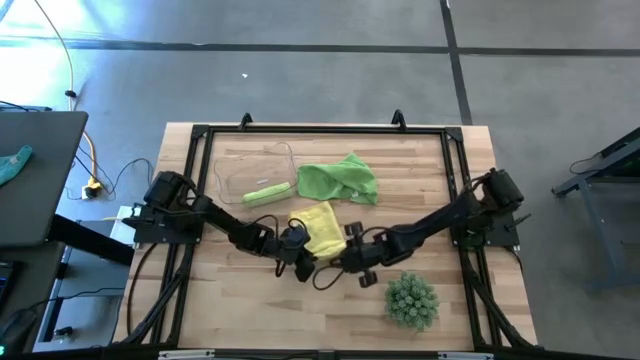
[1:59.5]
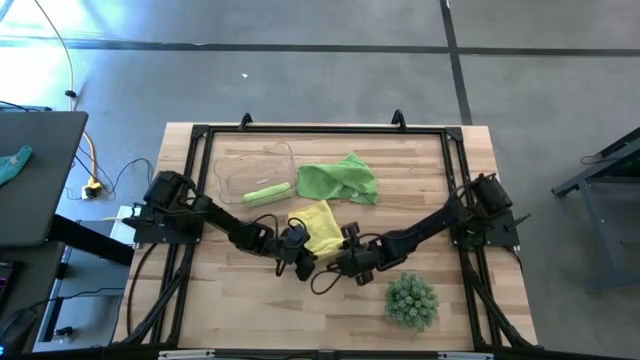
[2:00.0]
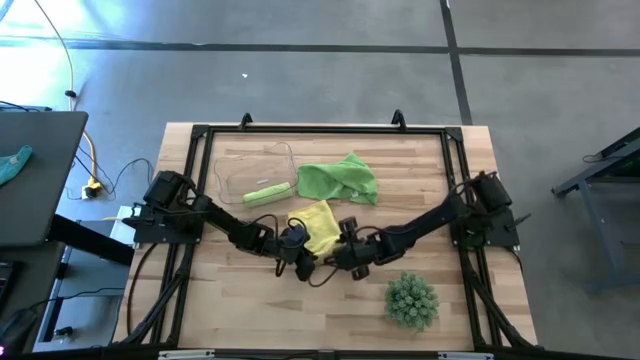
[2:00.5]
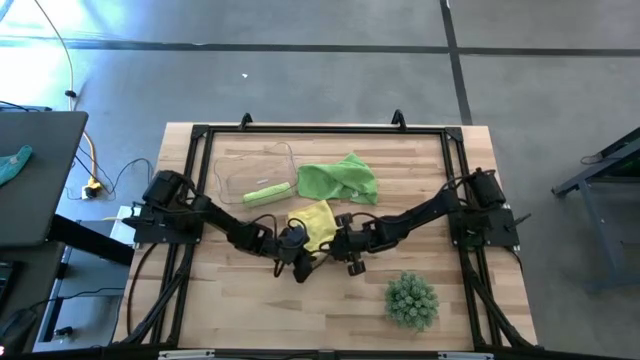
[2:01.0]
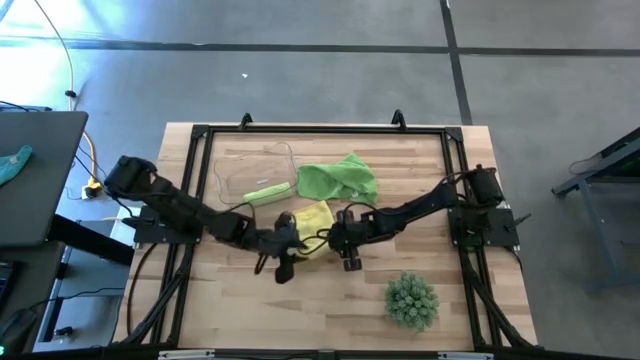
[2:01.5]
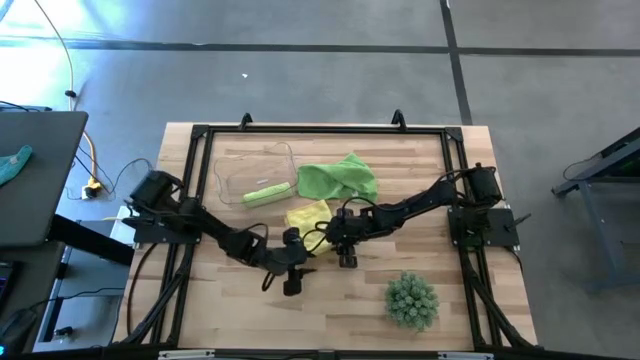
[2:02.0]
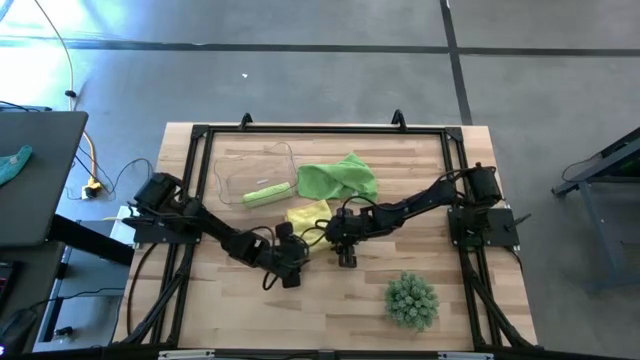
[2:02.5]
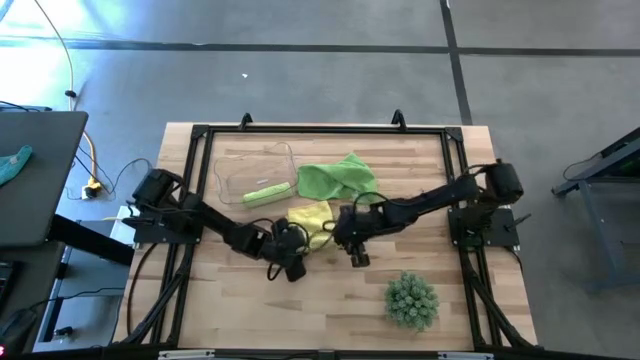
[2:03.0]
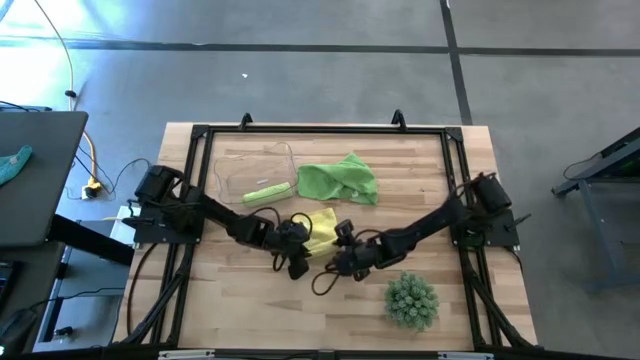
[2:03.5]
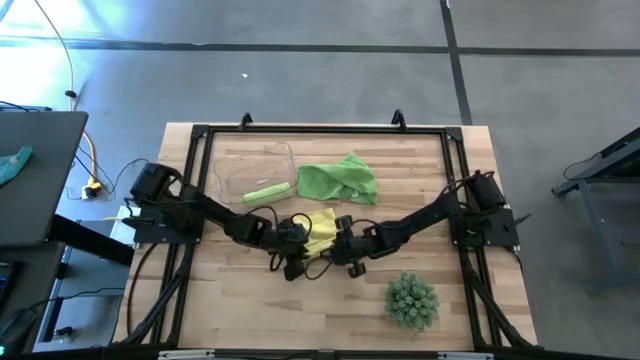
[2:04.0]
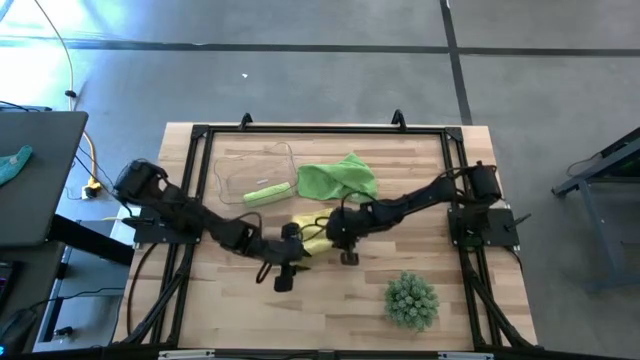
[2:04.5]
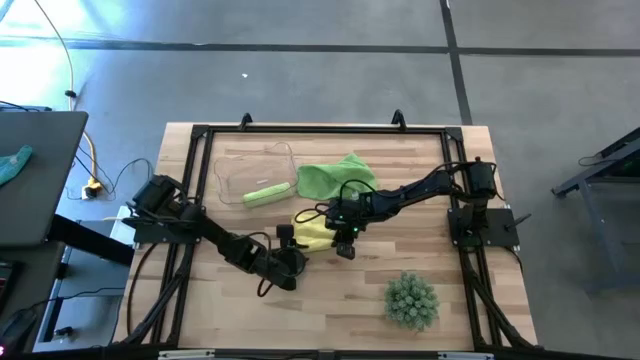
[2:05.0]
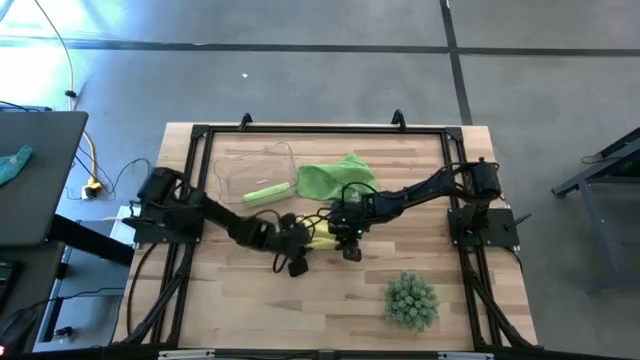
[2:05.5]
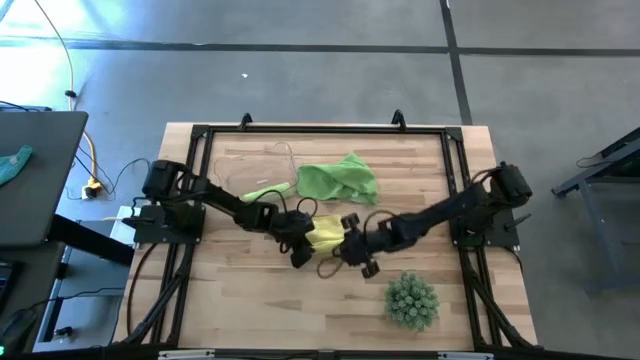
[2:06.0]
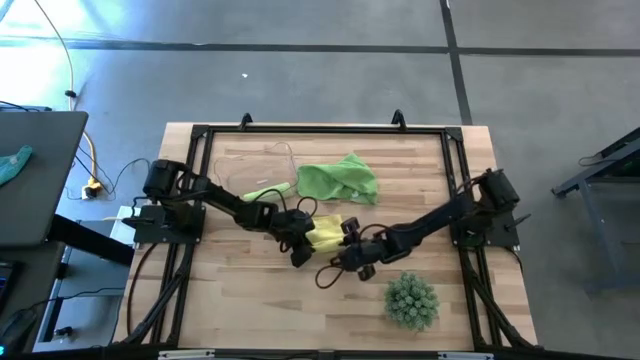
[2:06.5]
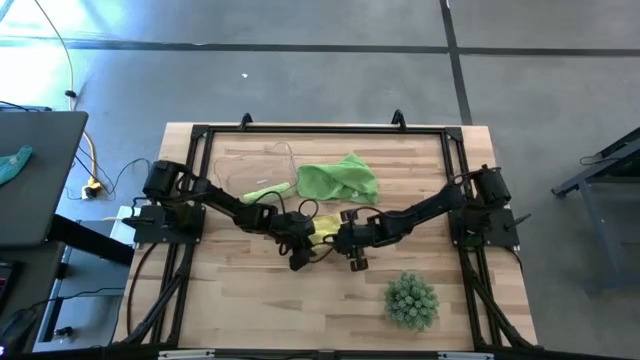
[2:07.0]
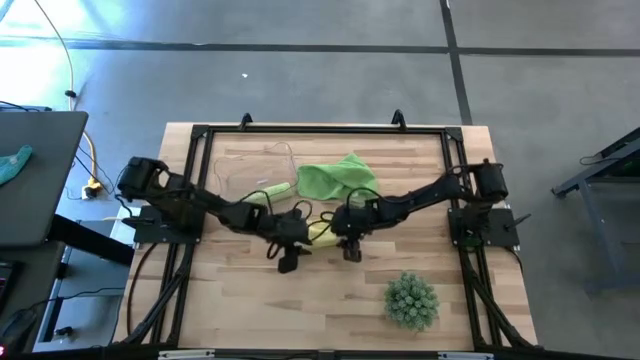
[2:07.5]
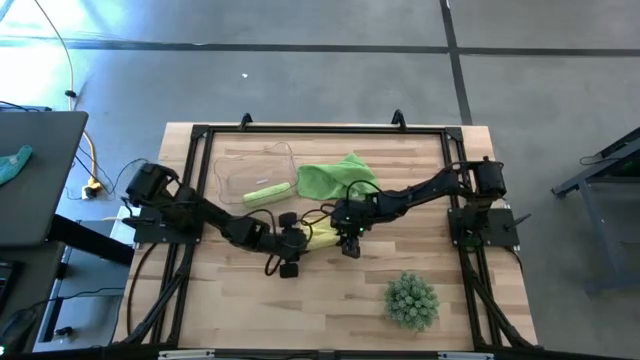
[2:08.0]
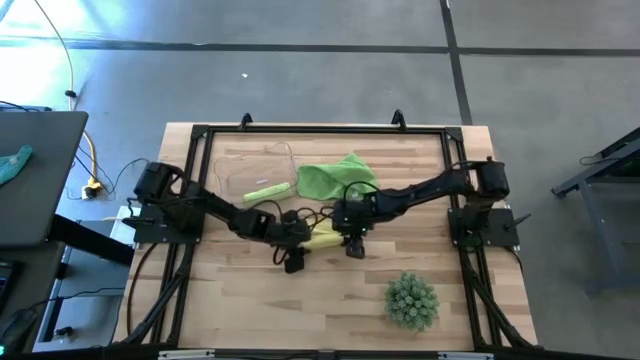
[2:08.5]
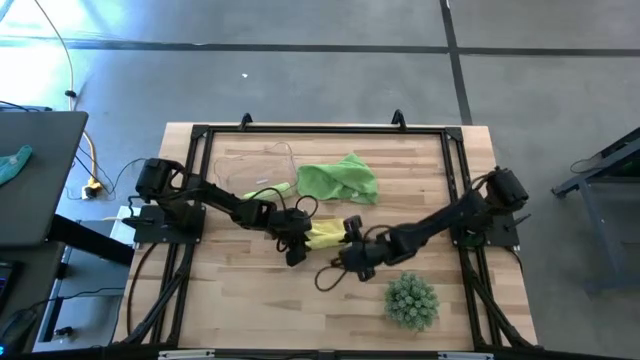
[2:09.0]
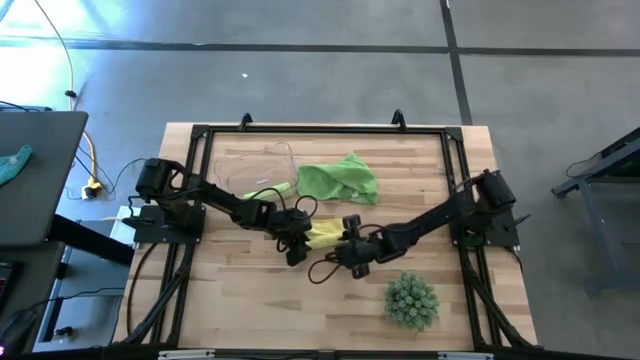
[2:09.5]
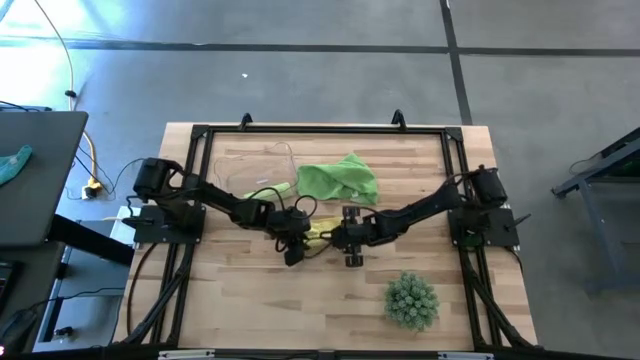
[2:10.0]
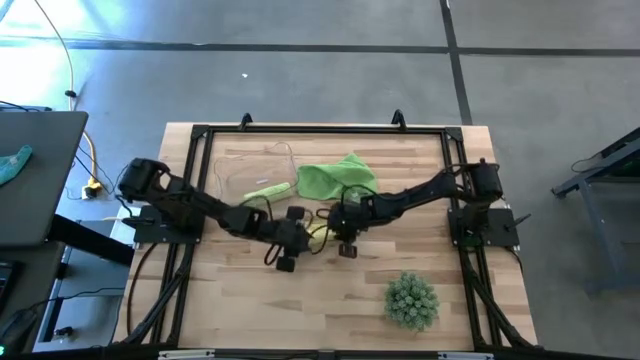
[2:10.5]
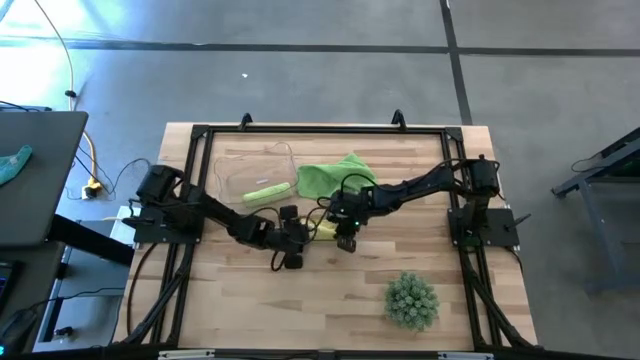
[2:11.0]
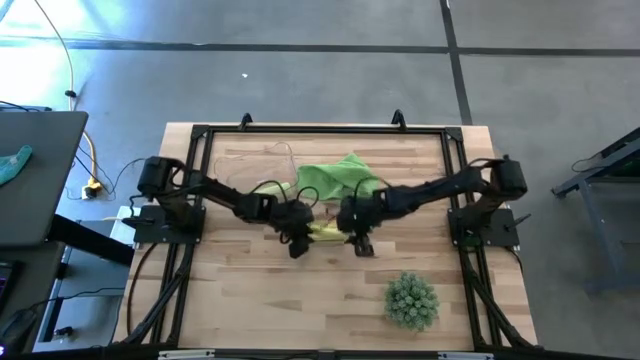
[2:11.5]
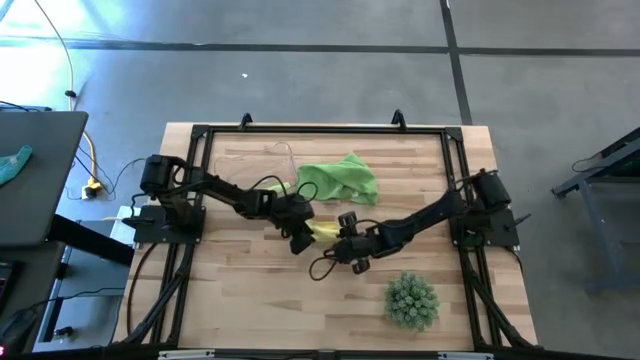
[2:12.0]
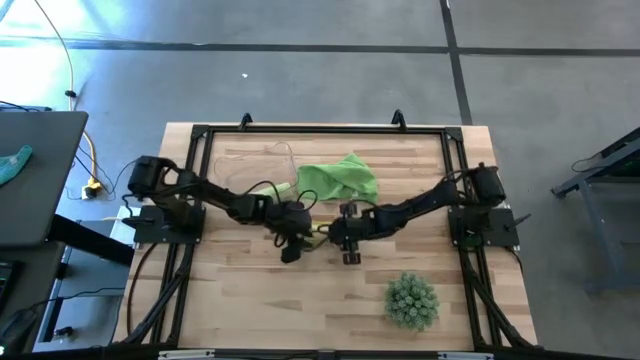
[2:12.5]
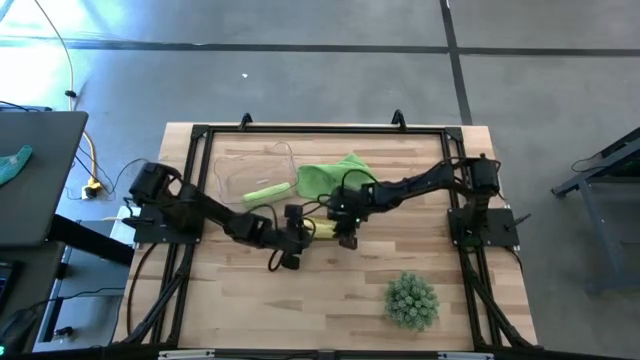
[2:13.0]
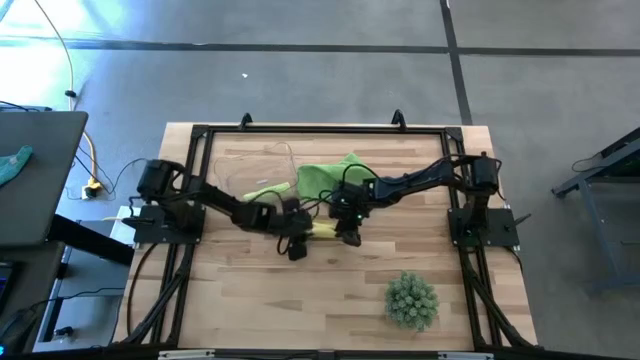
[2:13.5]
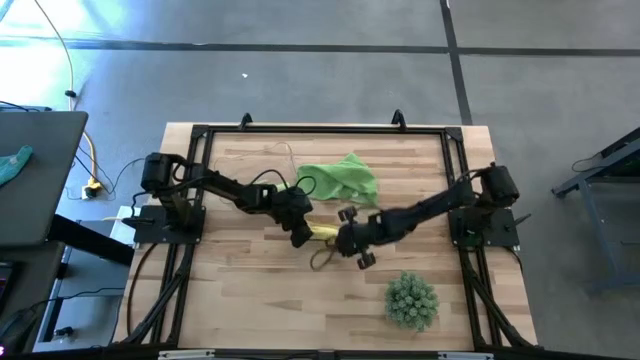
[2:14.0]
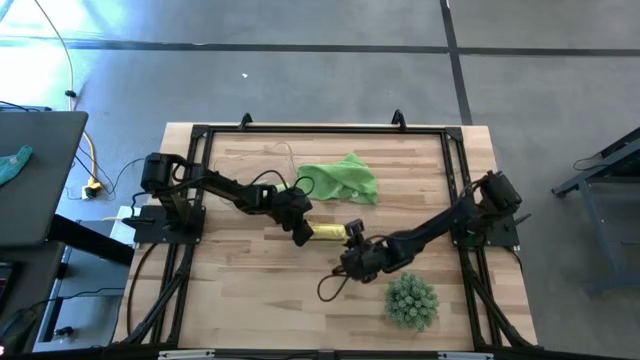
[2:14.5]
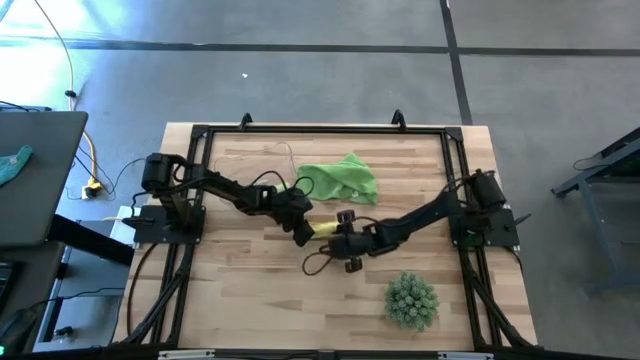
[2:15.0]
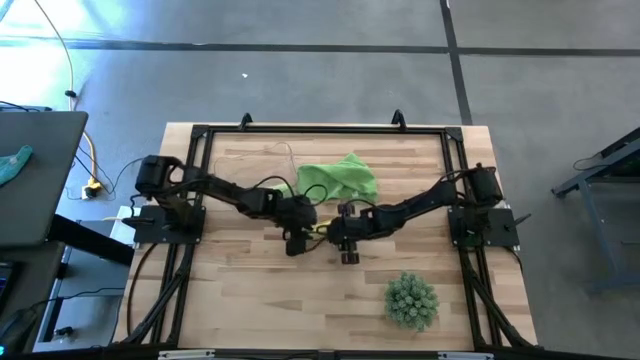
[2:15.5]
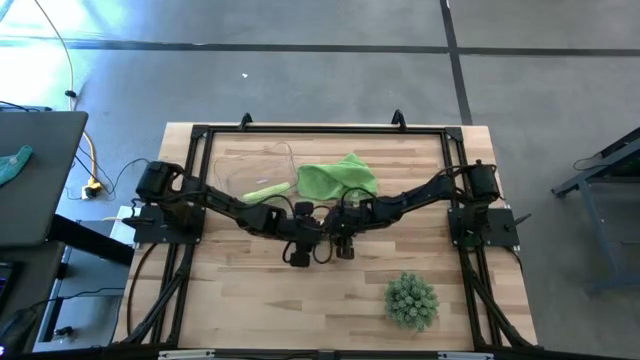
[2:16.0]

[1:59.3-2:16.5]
Task: Roll microfiber towels into tight, uniform cylinder then place into a basket
Roll the yellow towel

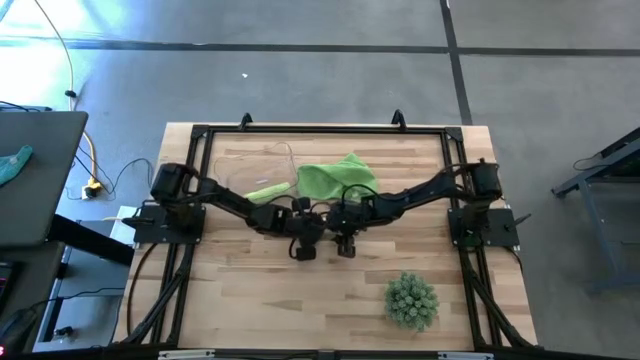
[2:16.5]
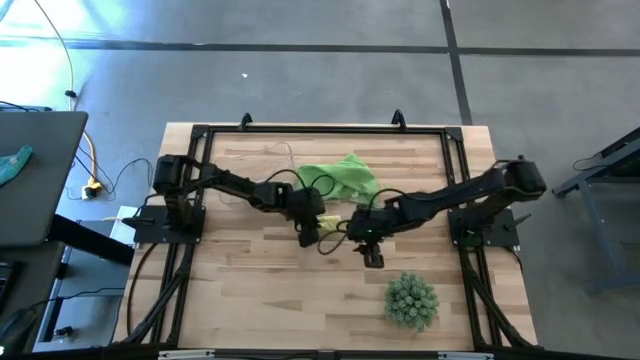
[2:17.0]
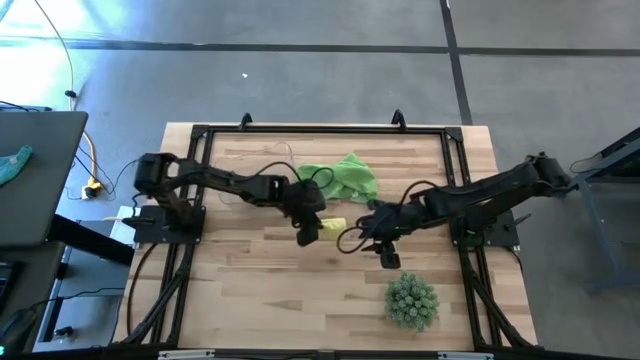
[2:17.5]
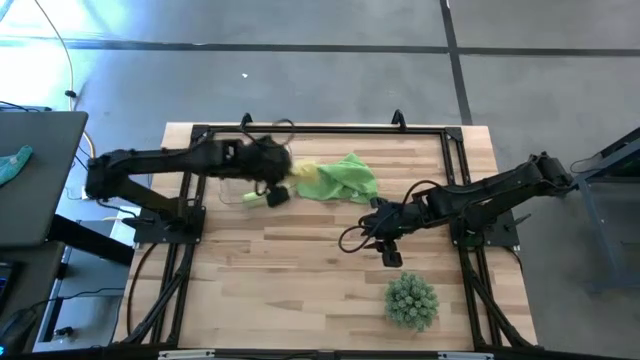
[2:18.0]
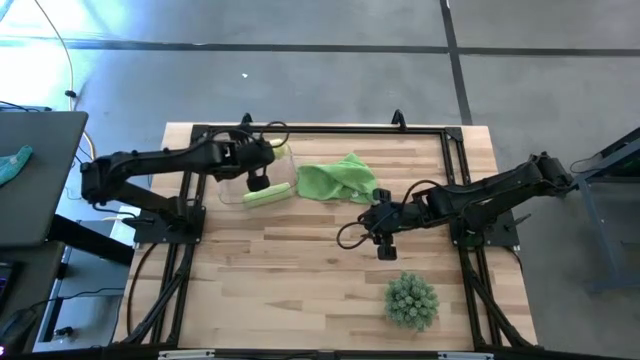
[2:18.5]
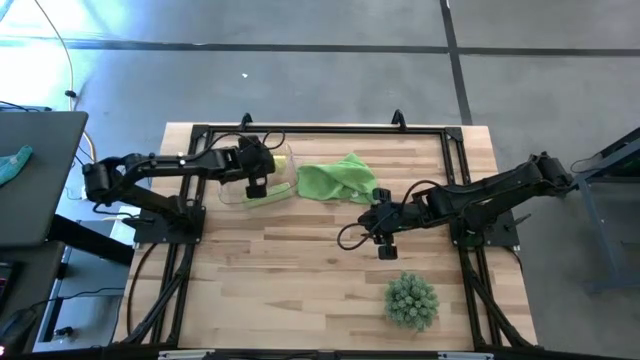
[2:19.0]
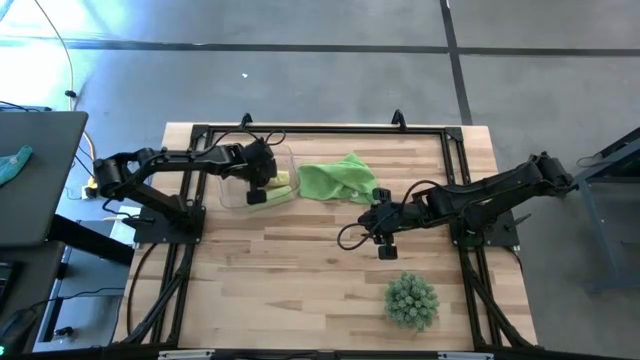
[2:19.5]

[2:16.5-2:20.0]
Put the yellow towel into the transparent bin
